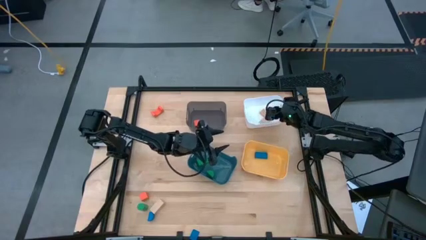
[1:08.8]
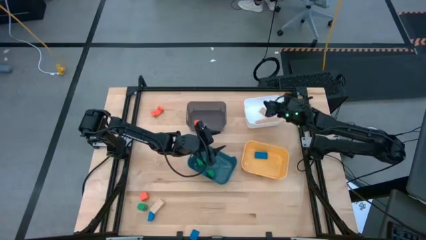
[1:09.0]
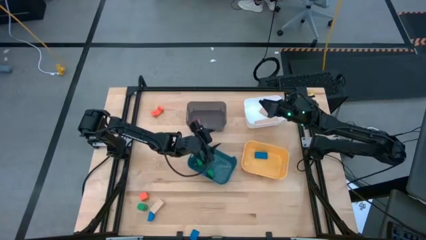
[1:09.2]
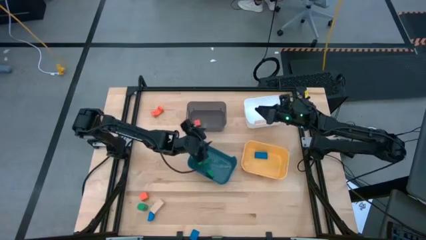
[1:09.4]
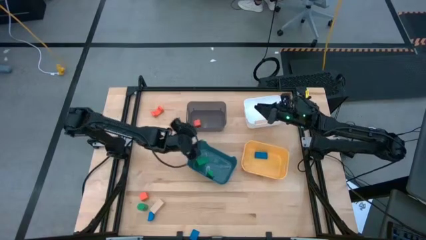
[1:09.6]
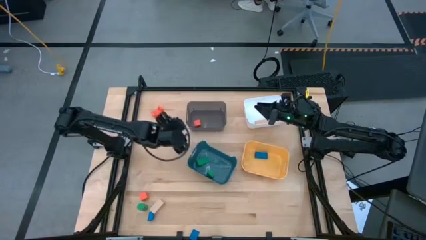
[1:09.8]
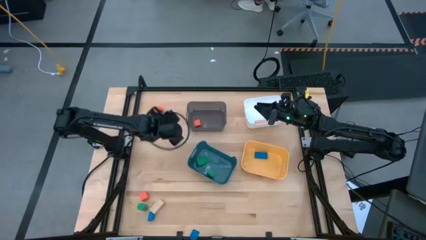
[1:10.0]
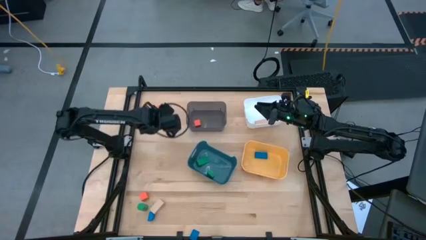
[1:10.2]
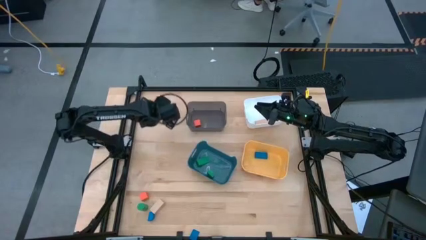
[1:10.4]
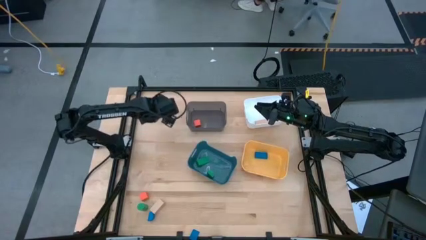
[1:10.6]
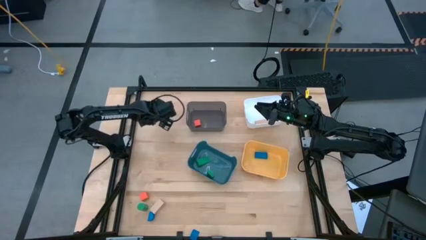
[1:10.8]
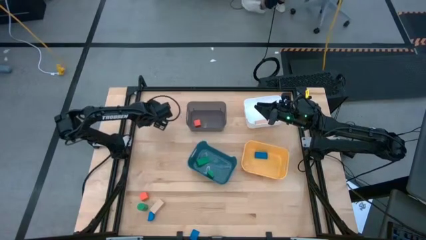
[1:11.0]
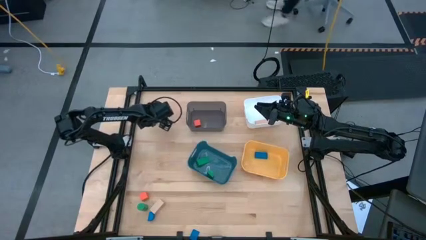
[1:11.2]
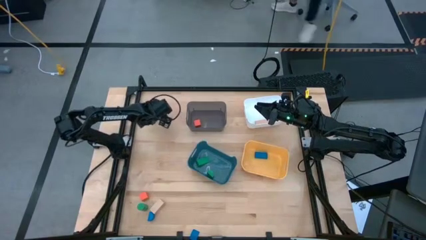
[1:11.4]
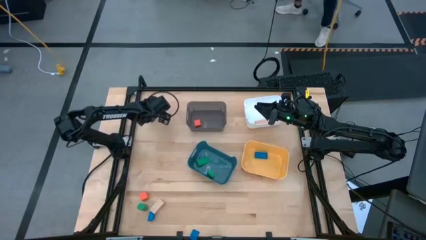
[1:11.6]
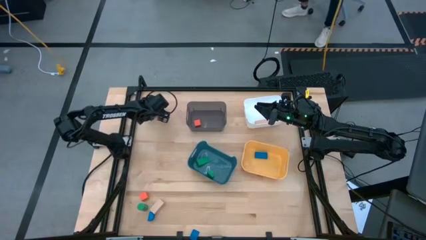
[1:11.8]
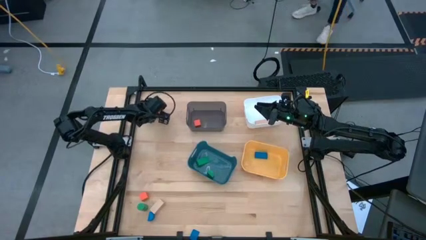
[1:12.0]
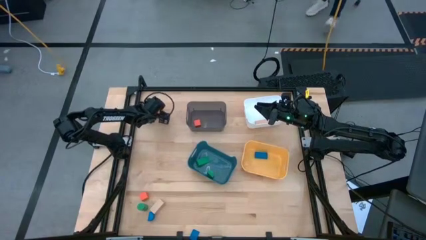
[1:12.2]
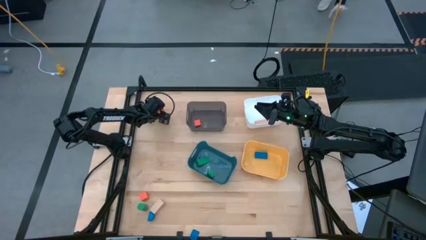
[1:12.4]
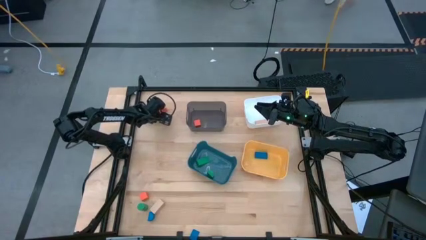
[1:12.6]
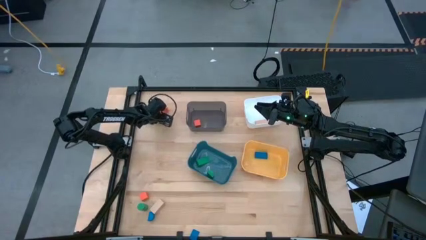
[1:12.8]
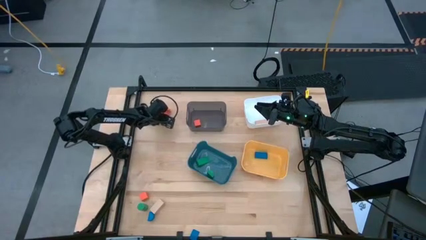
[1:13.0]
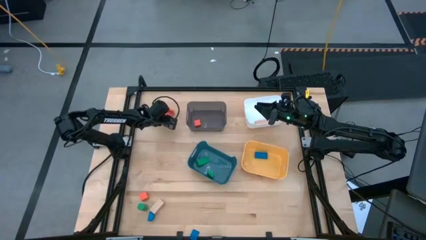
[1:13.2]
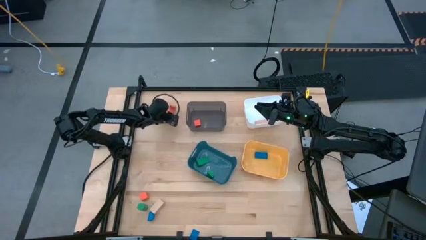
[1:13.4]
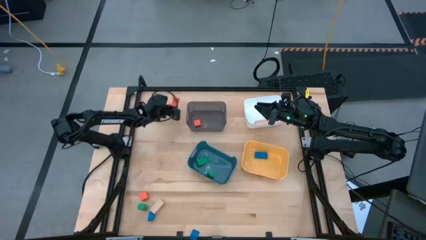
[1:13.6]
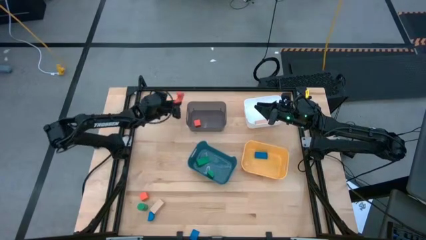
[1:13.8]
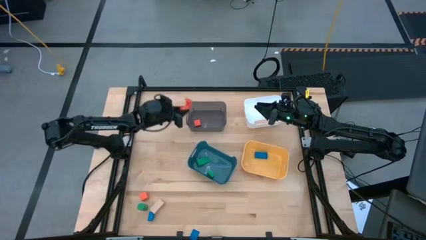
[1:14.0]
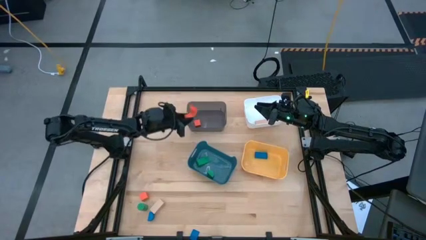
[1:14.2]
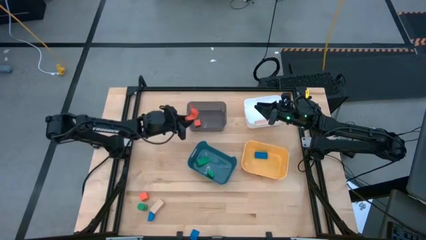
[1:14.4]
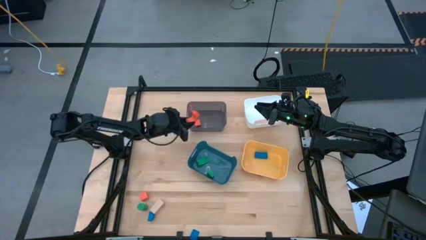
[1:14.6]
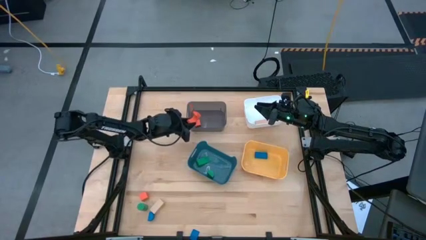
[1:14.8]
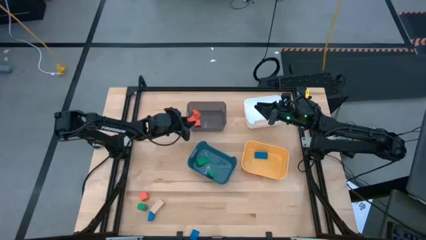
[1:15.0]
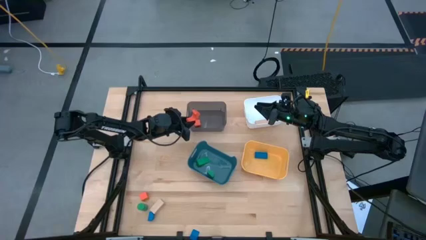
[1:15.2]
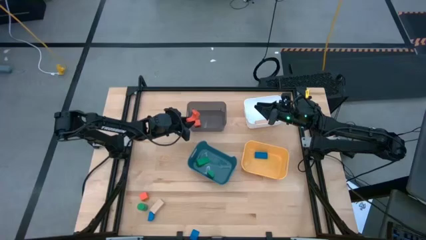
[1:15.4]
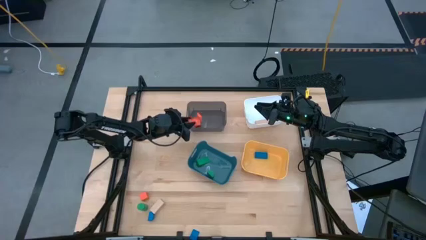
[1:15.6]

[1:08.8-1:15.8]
Task: Sort & place blocks by color
Put the top orange block into the transparent black bin

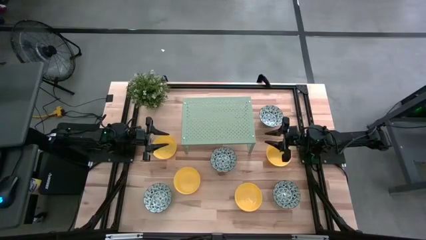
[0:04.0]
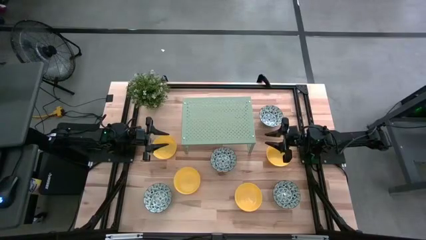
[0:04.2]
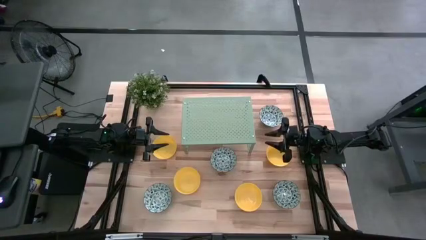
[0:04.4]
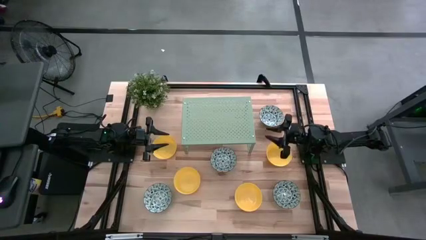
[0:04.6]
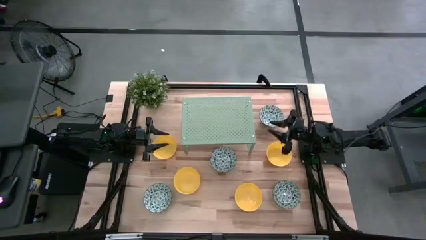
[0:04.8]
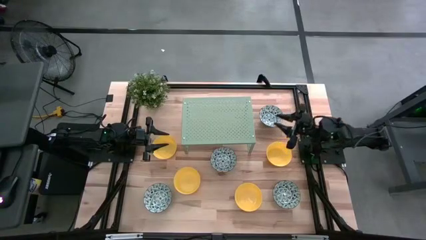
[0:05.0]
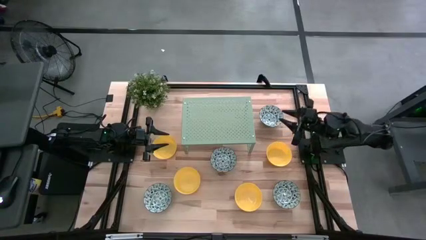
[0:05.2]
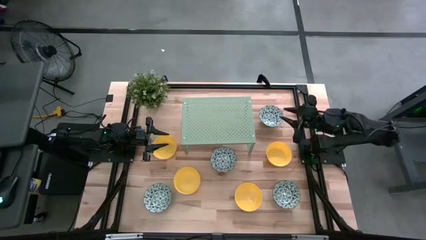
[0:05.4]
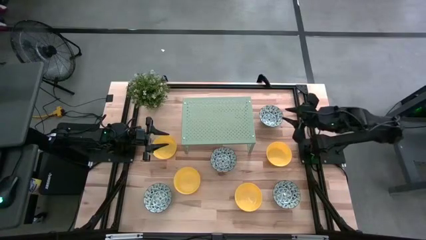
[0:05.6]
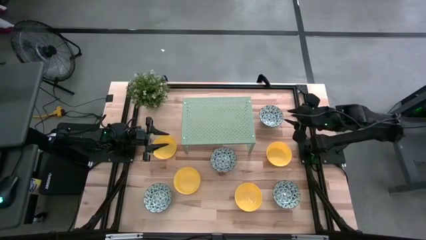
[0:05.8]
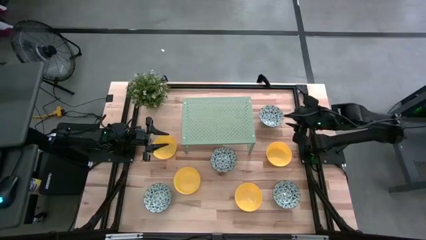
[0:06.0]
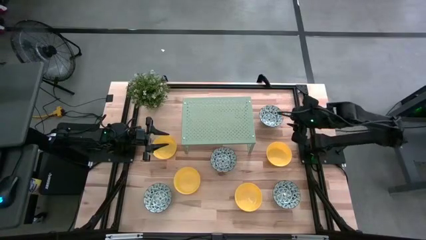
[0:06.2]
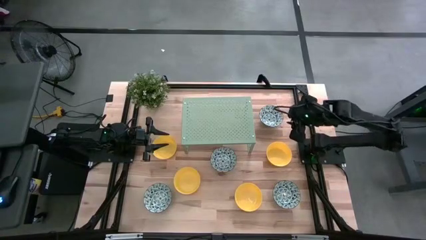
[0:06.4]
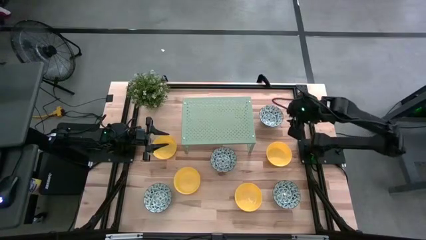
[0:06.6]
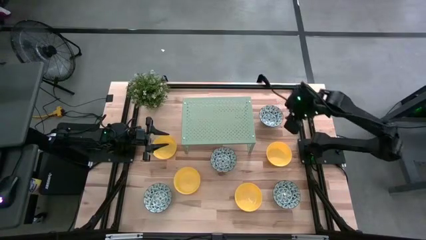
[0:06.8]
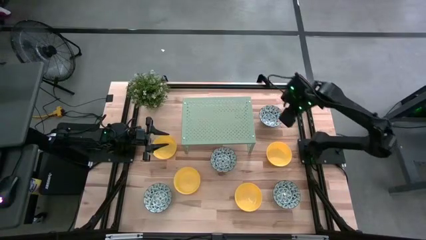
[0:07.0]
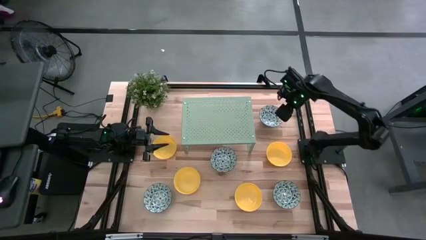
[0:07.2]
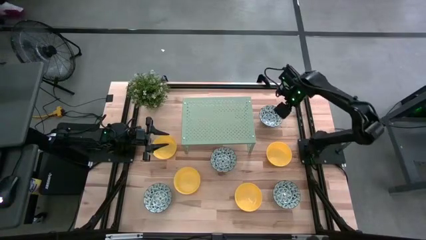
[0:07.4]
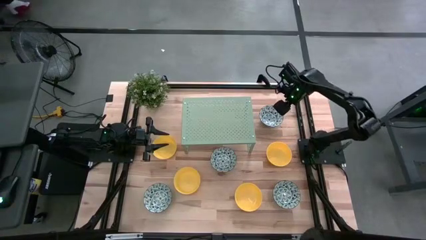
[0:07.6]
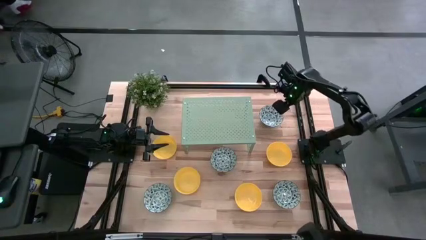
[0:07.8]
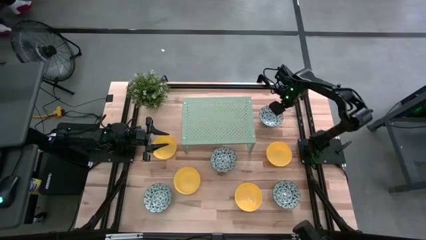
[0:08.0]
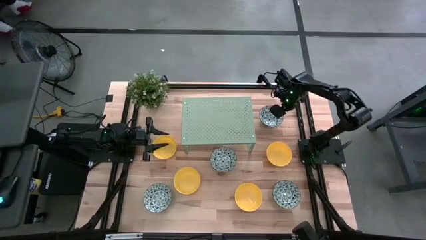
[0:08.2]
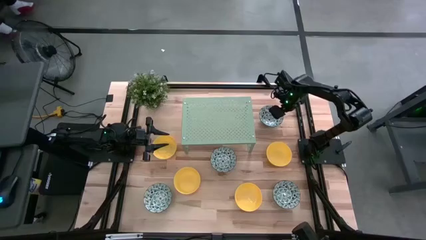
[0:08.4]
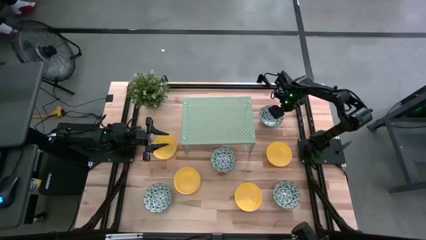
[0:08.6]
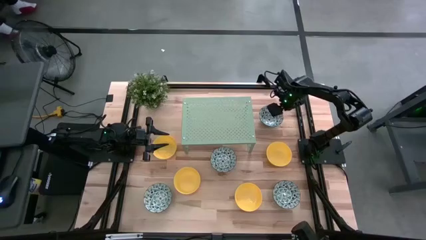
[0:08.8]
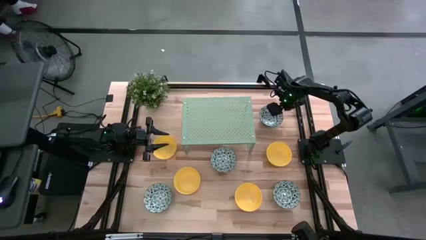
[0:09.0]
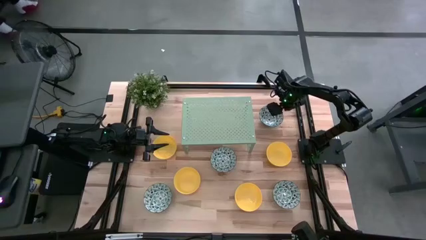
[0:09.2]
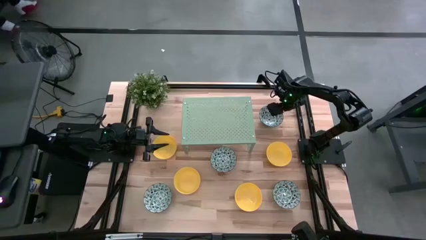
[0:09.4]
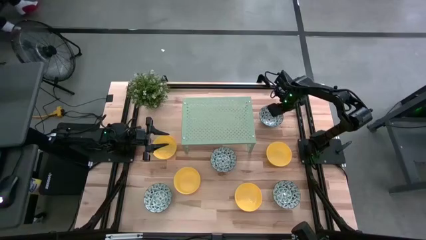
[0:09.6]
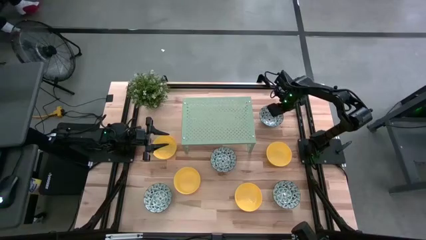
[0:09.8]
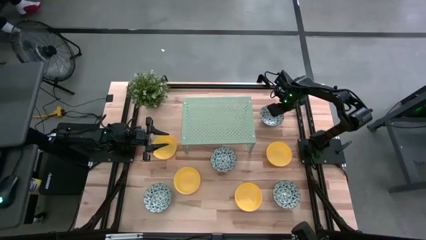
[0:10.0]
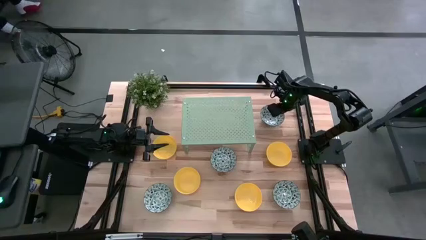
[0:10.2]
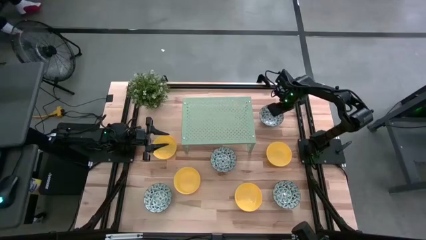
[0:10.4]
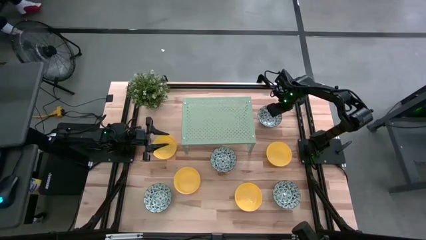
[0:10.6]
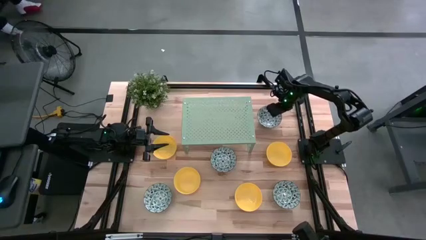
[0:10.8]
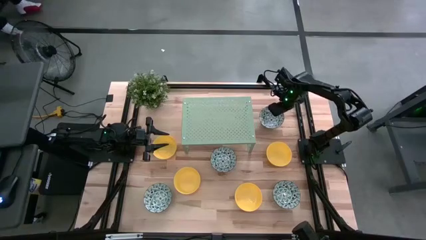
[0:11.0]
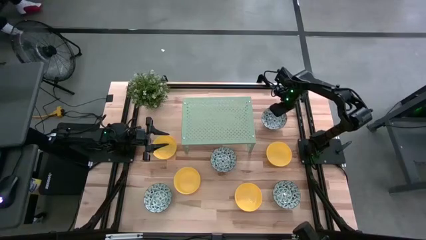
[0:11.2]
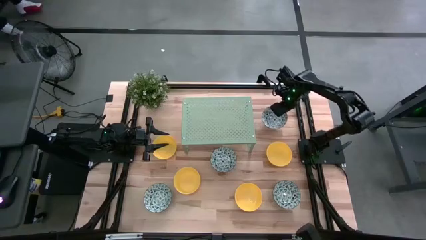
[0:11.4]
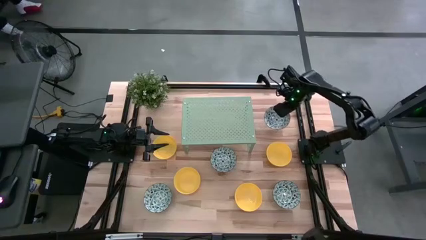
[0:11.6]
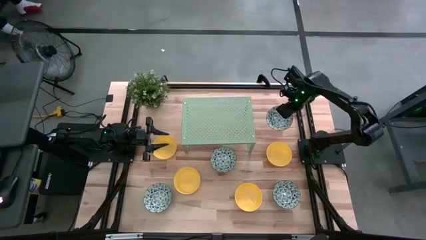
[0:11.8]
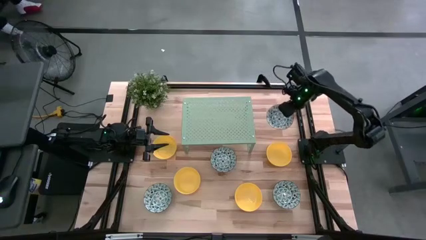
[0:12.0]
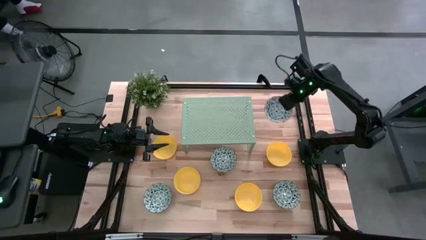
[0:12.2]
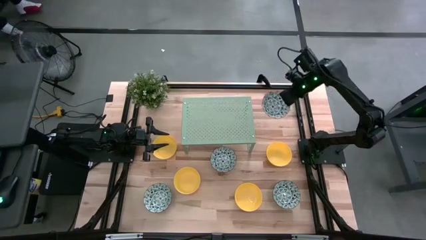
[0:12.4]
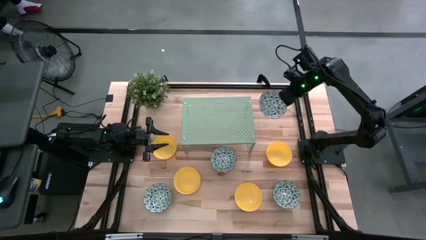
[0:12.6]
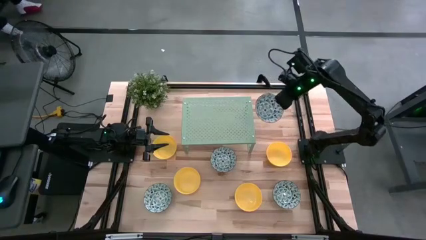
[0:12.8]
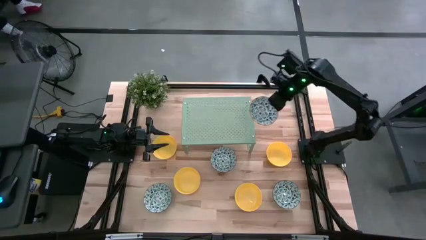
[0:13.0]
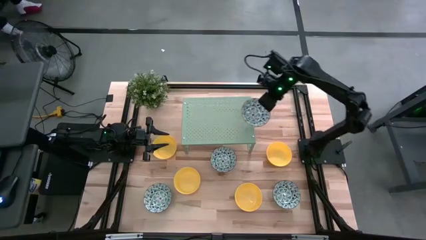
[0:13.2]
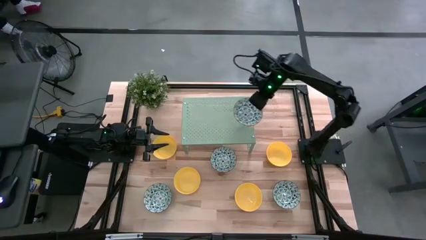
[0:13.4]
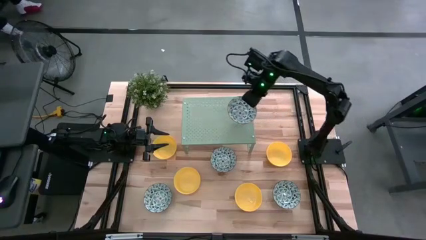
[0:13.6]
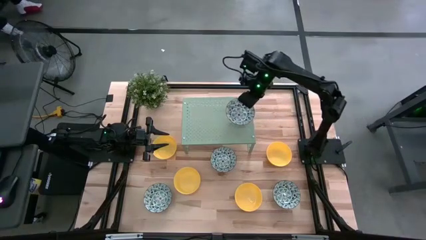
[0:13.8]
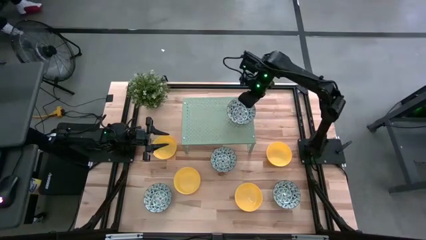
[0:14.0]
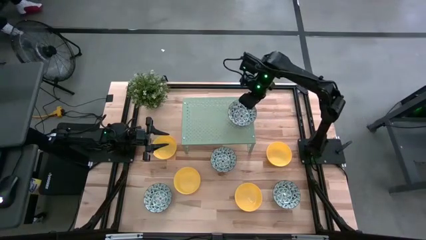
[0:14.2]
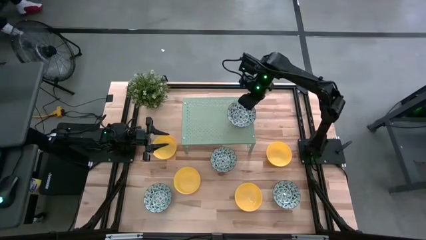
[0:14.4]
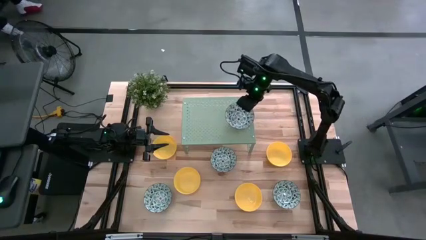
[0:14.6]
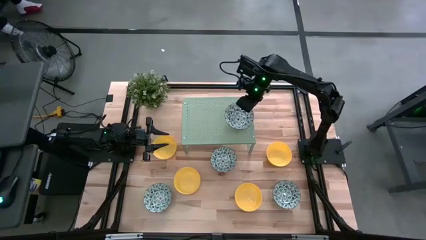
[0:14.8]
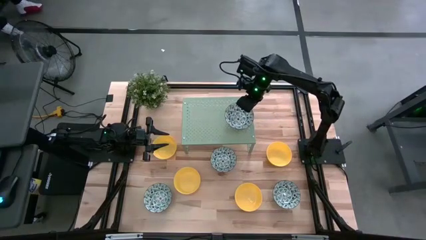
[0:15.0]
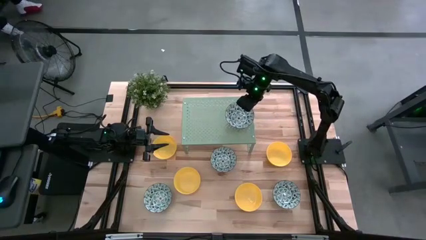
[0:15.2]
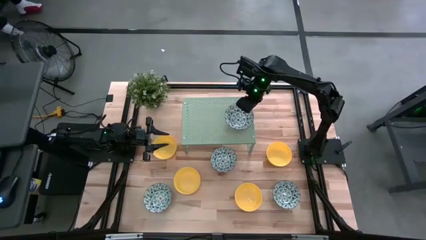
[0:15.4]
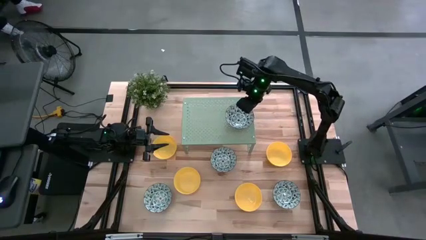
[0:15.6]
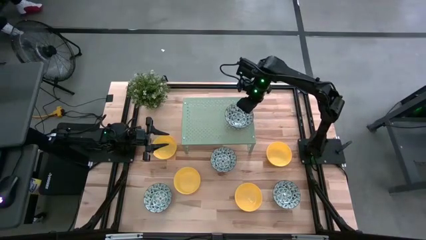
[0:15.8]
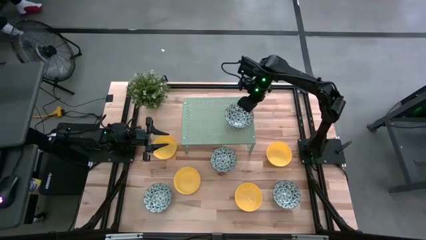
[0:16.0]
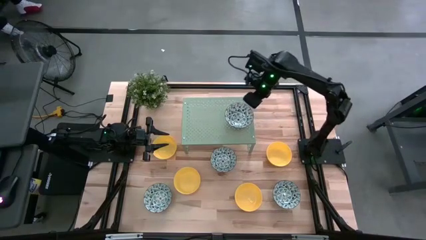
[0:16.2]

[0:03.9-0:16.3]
Task: Pick & Place Mini bowls
Put the top green patterned bowl on the shelf
